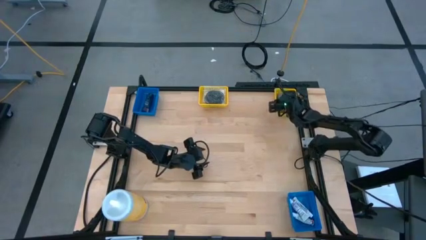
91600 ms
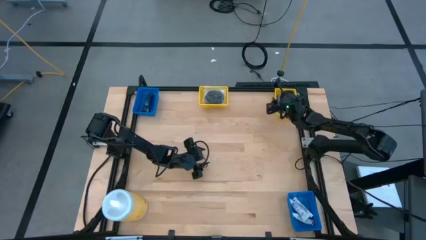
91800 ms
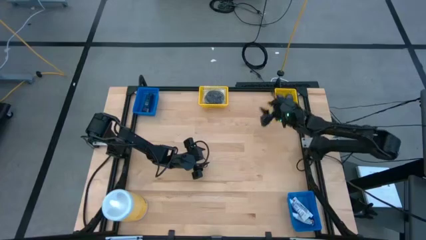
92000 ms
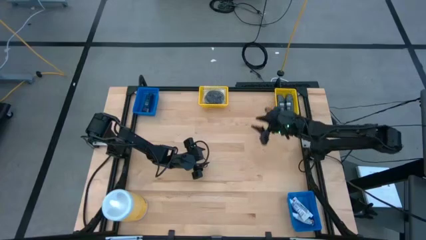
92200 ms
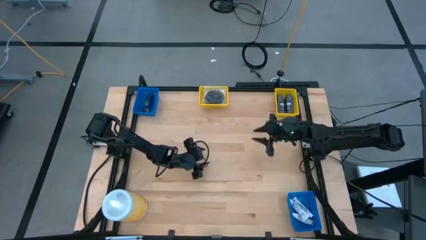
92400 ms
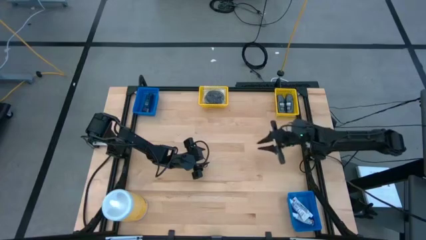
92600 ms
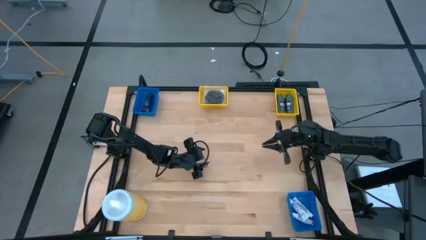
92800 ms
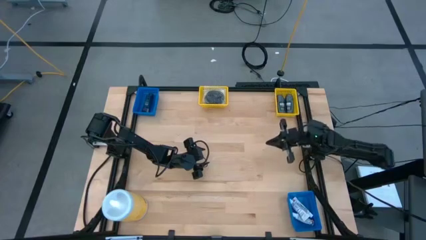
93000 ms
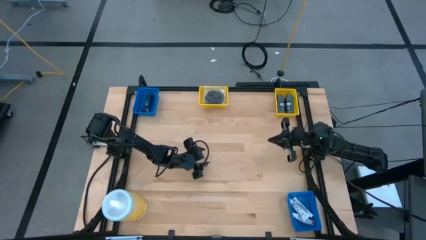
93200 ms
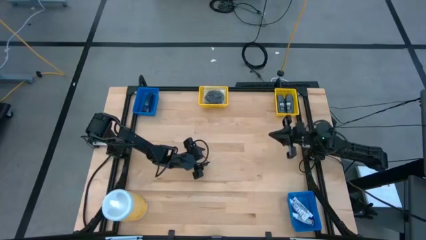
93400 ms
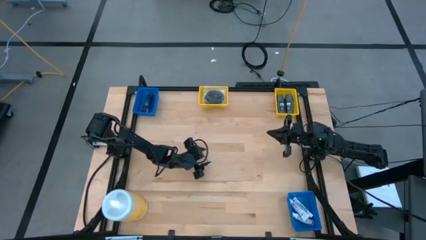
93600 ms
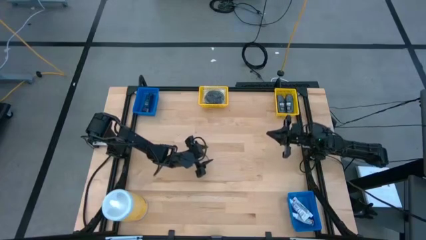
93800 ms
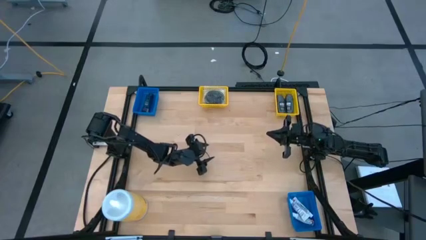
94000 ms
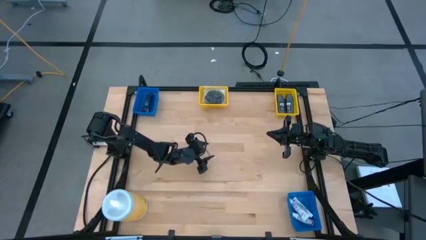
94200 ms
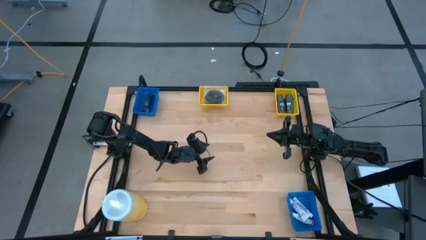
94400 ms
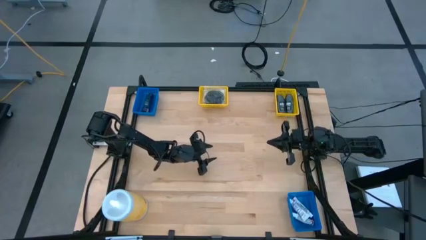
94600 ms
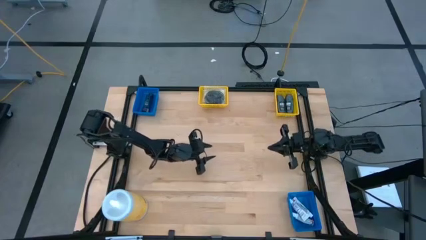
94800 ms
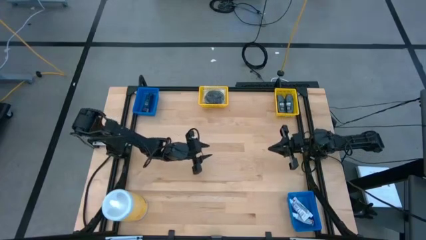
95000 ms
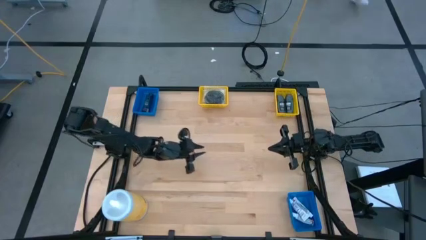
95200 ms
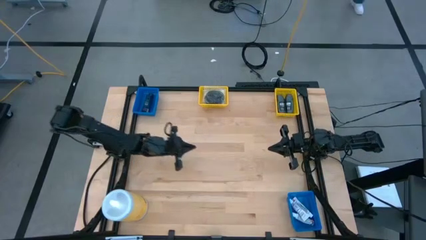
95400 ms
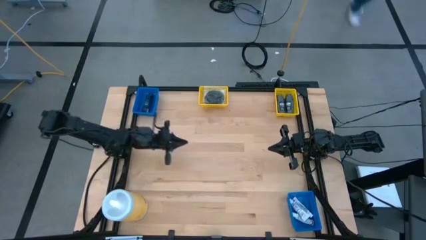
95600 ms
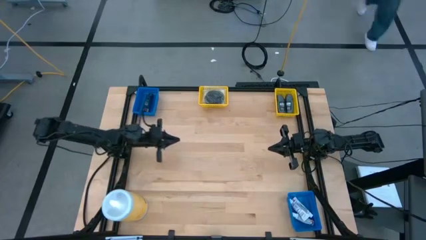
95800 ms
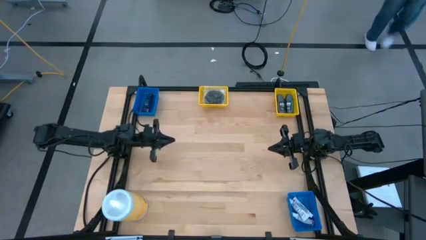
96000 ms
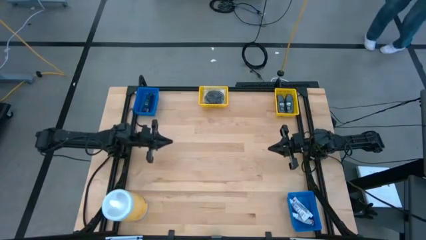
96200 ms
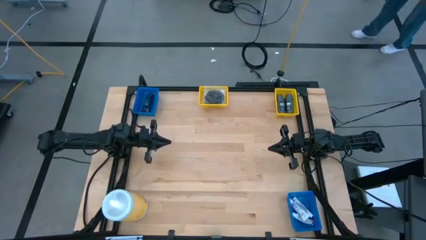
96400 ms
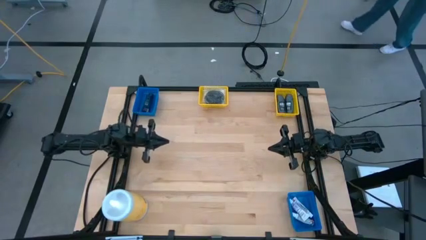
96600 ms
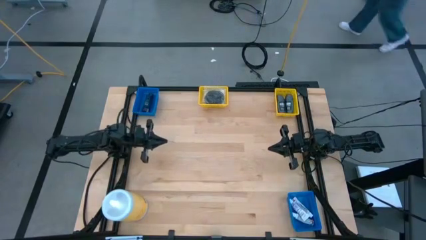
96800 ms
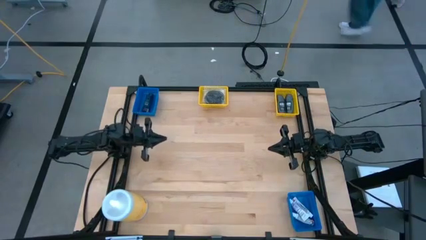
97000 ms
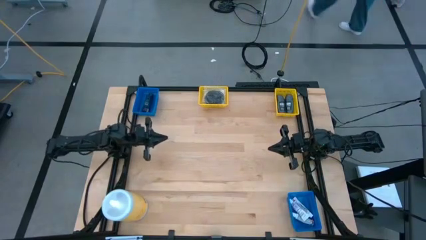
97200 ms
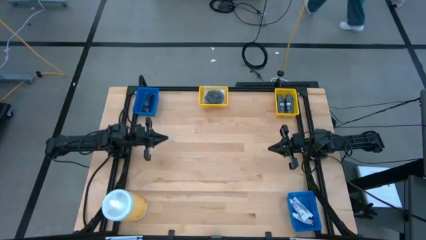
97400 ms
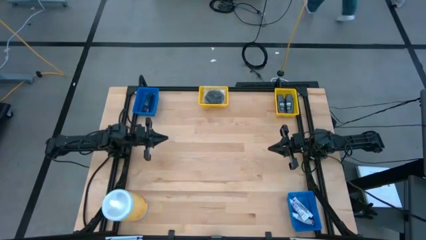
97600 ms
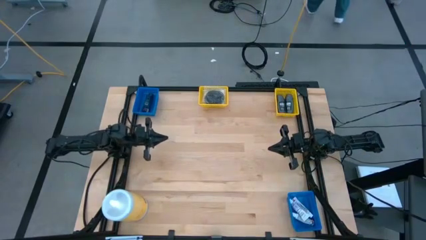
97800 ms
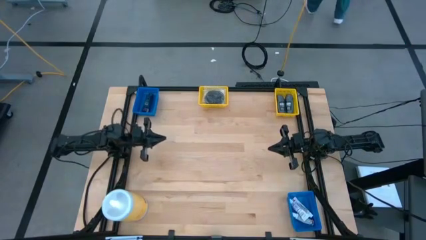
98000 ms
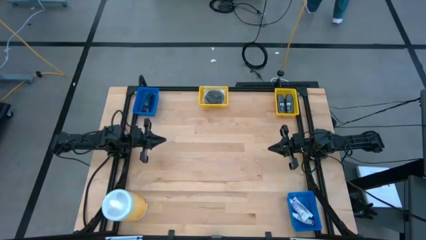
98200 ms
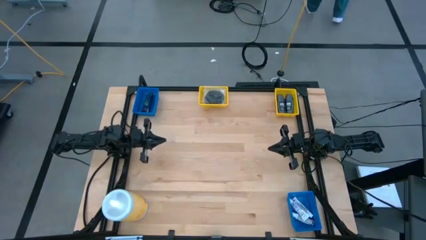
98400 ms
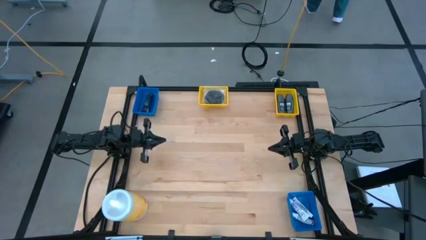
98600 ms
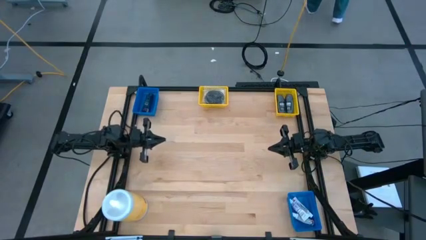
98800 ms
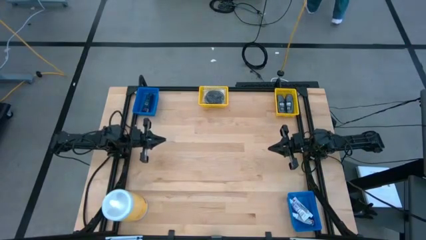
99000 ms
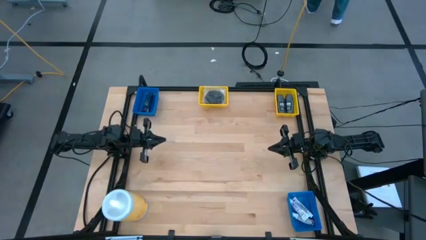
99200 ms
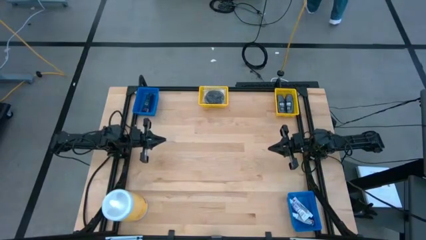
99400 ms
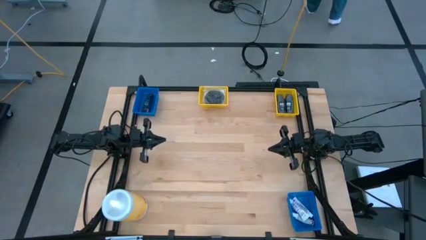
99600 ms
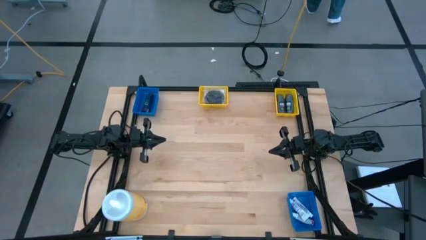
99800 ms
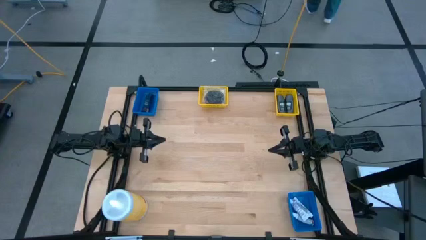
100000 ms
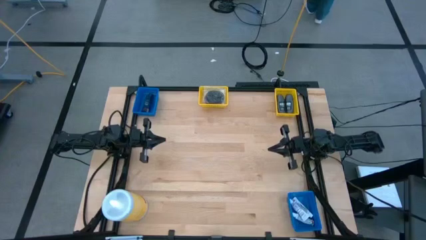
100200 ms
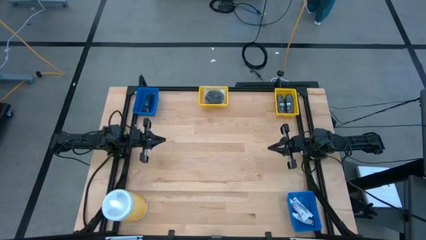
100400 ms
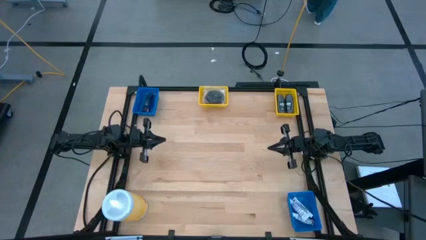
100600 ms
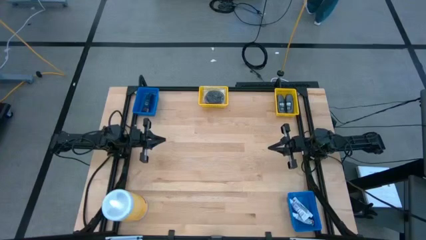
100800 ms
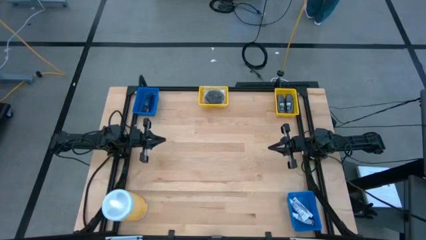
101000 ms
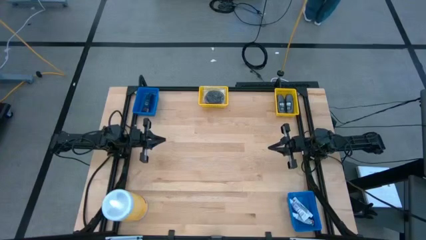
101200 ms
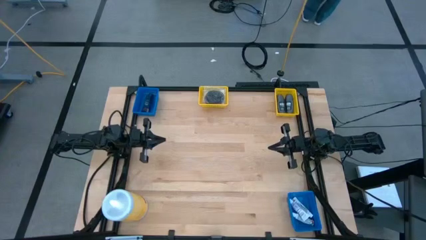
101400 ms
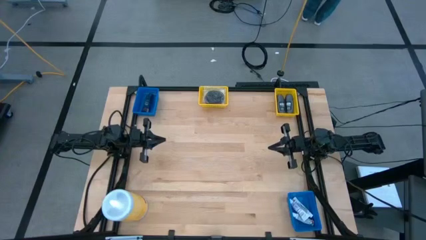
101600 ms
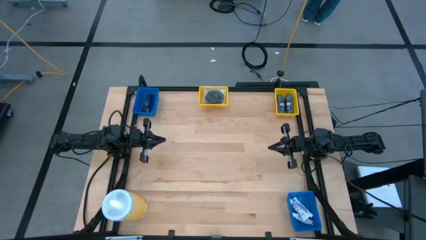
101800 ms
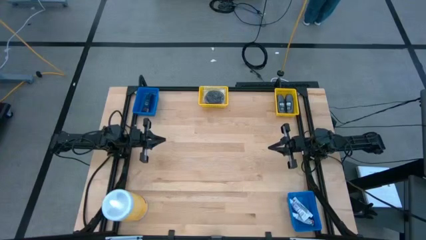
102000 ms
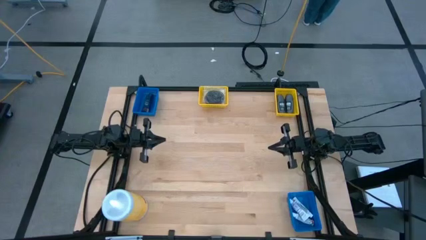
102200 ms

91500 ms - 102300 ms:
Task: Pick & Place Travel size toiletries
Return to Home Position

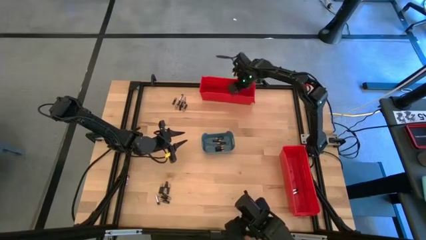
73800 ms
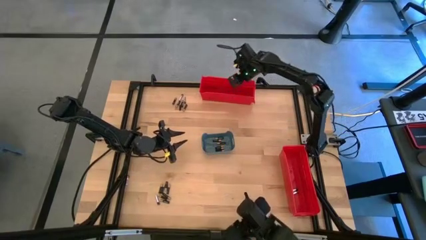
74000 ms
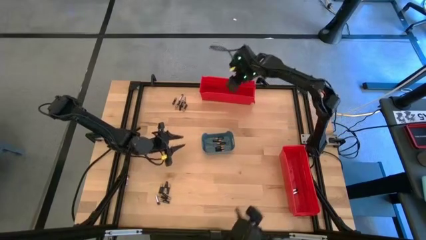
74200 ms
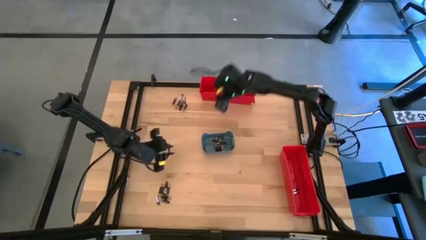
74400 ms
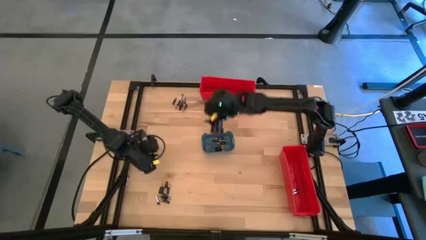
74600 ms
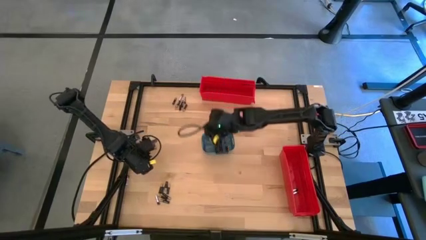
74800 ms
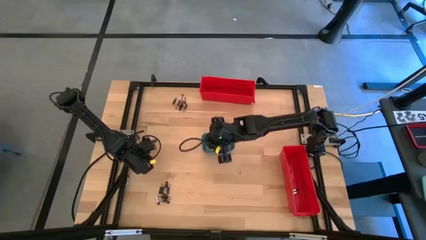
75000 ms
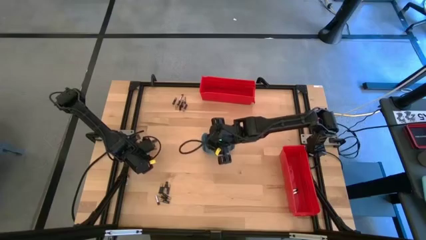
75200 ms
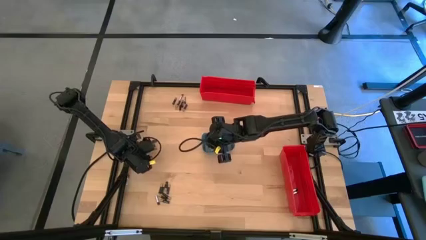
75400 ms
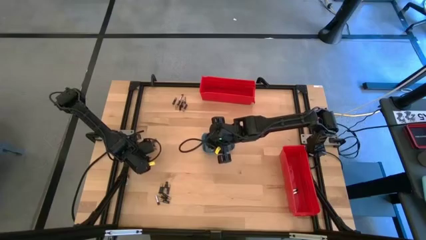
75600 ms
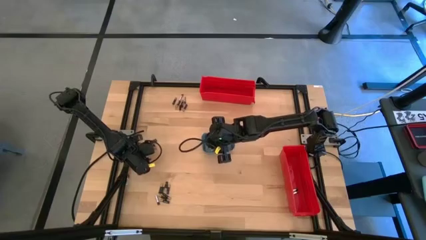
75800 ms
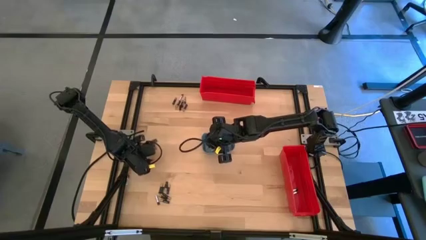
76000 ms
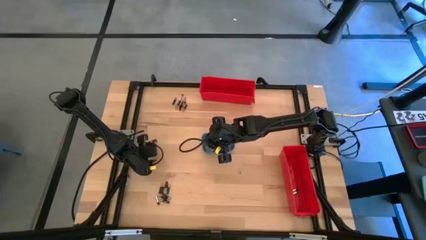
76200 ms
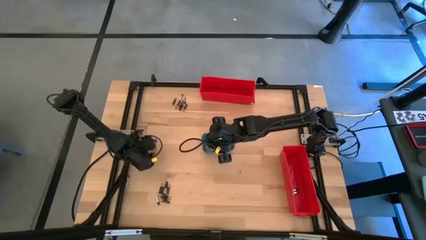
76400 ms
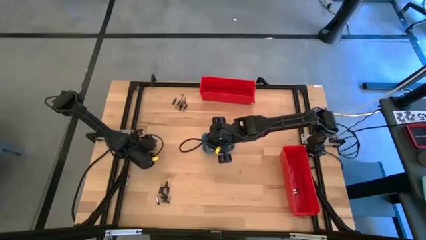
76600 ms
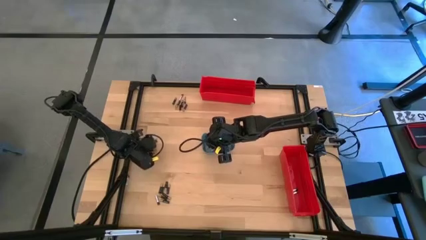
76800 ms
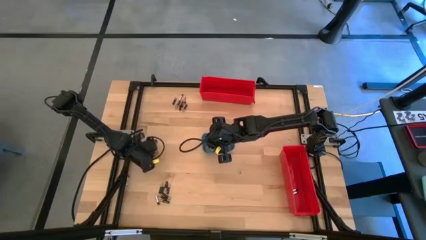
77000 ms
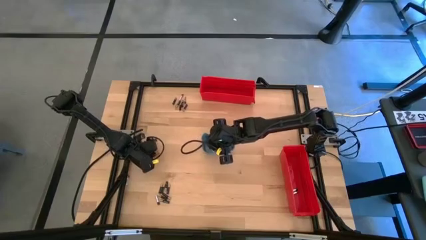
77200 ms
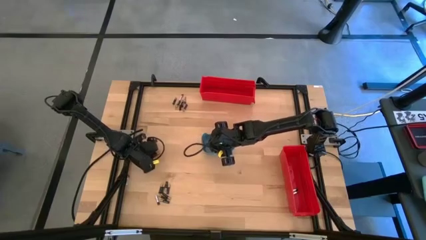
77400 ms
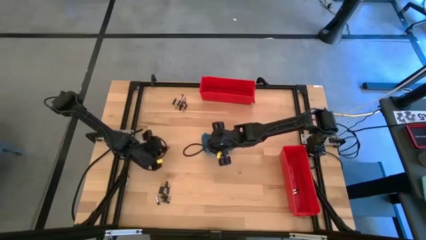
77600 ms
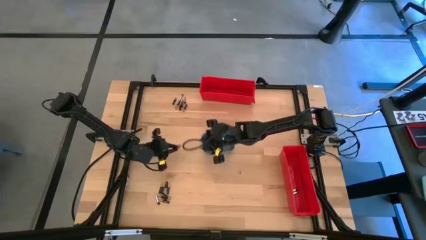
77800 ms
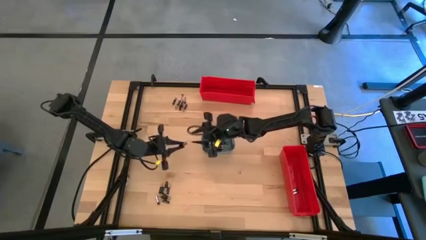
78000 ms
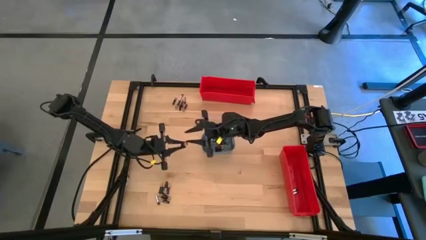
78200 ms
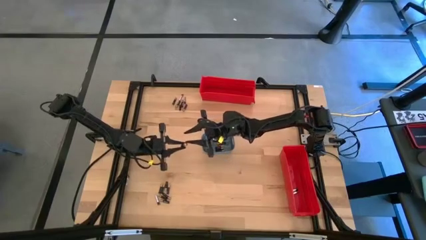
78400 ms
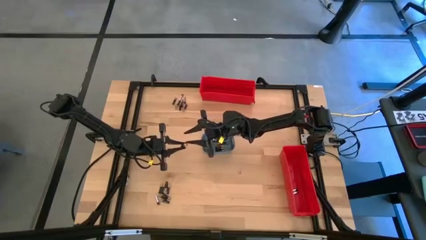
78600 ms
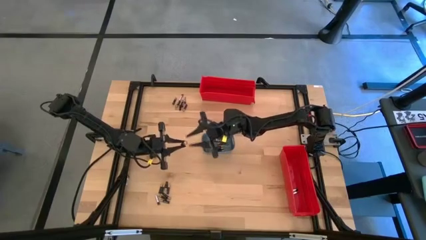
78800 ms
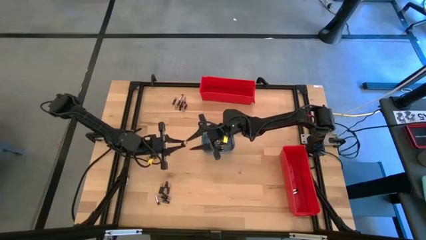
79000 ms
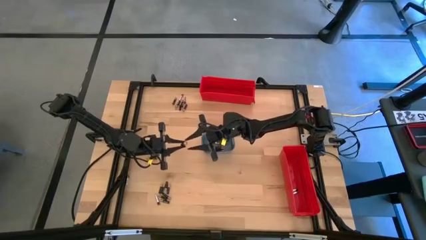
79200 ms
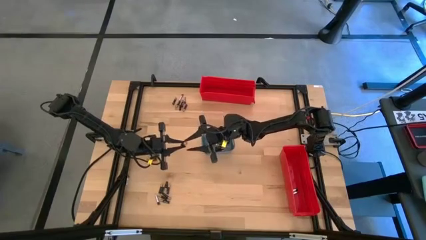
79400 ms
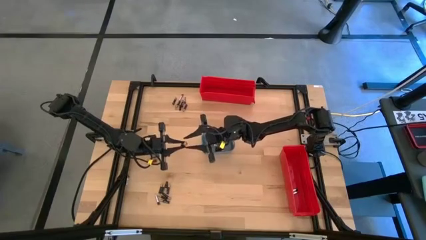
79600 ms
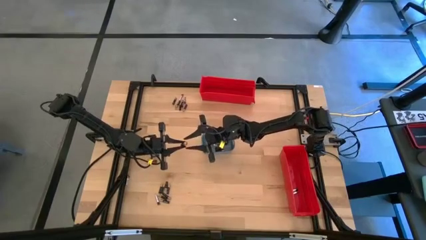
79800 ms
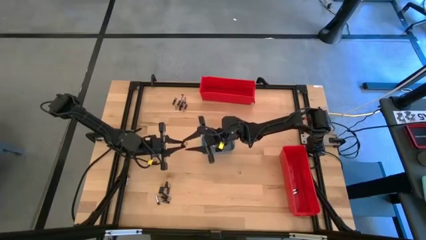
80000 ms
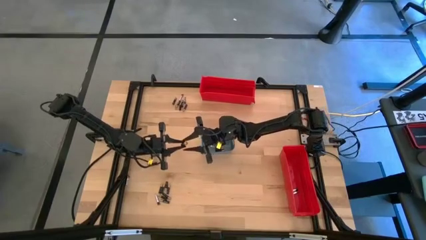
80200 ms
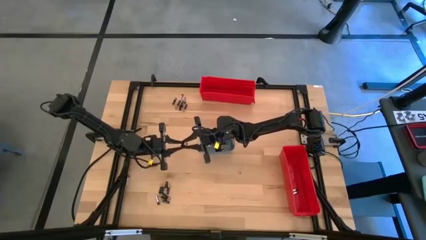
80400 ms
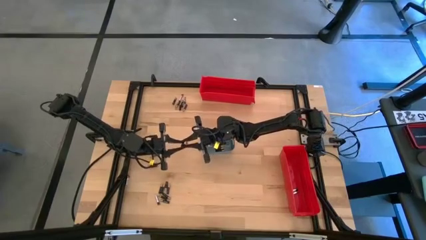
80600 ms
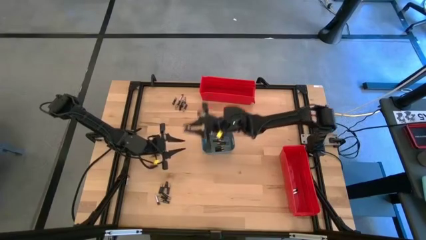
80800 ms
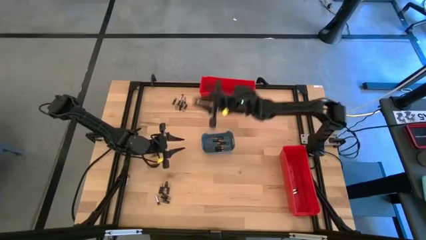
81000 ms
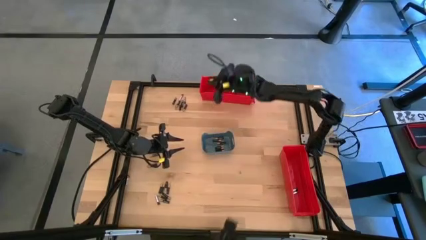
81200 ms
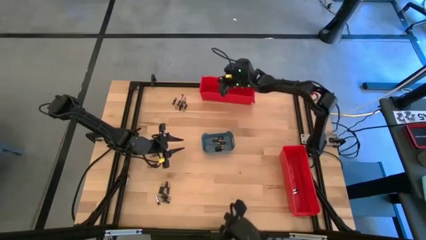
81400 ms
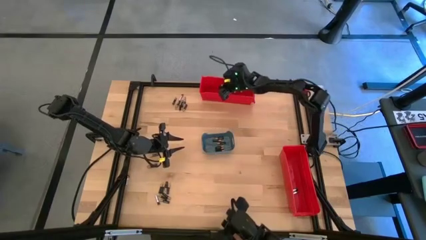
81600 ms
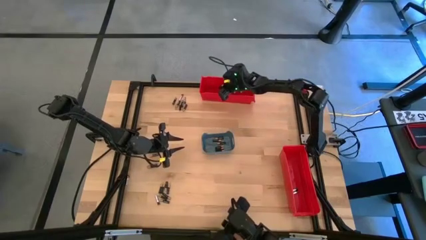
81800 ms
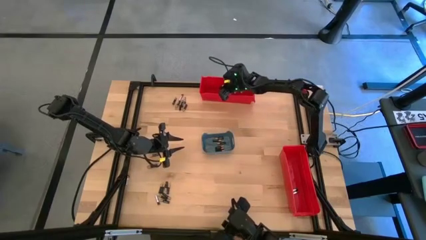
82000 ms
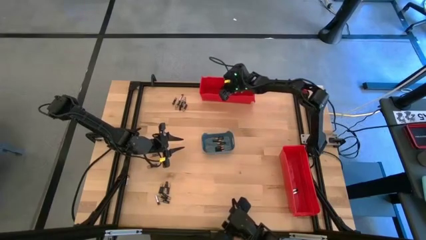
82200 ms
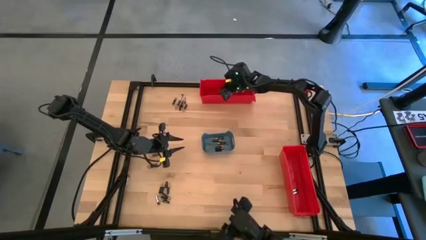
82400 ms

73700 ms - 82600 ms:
Task: Sort batteries
Put the black battery into the top red bin
